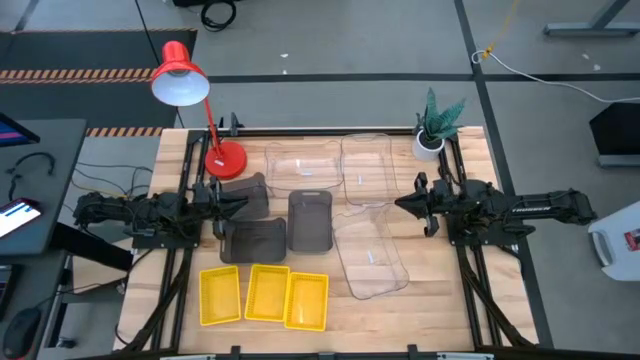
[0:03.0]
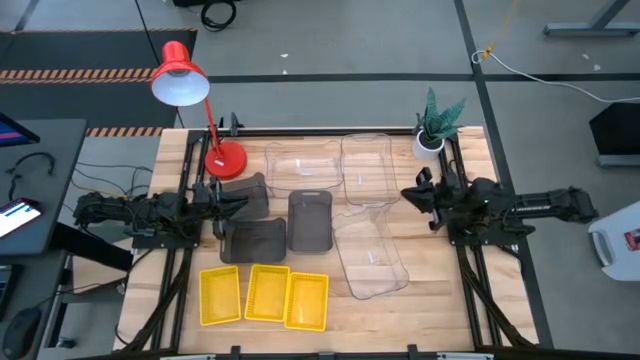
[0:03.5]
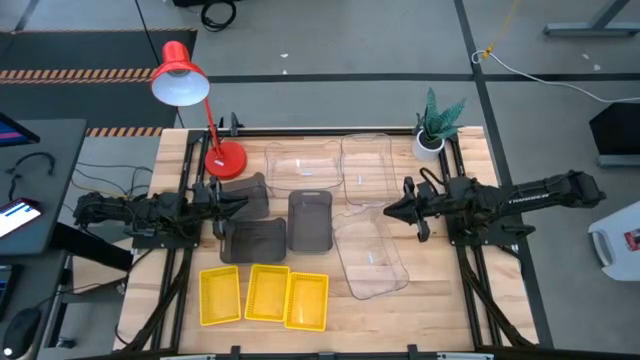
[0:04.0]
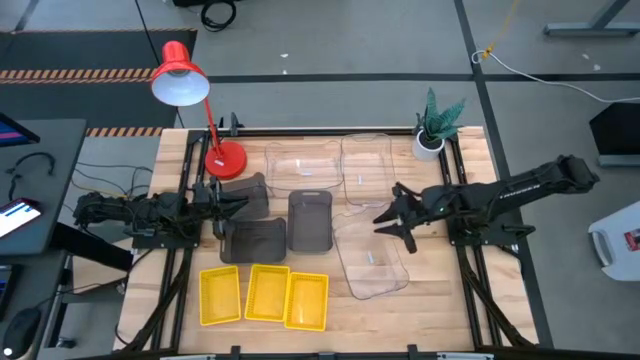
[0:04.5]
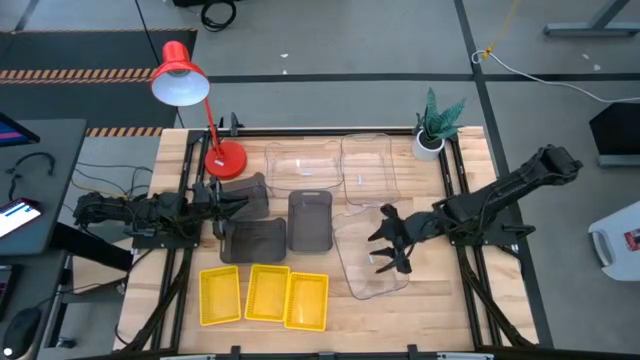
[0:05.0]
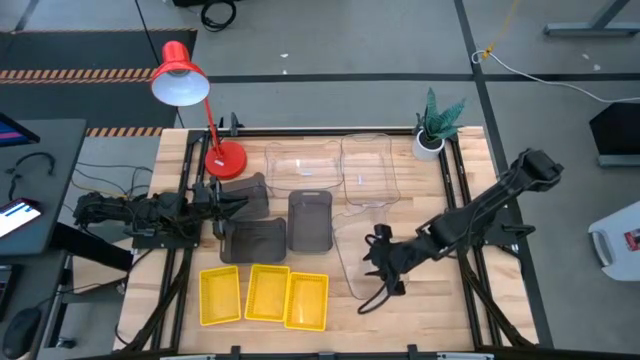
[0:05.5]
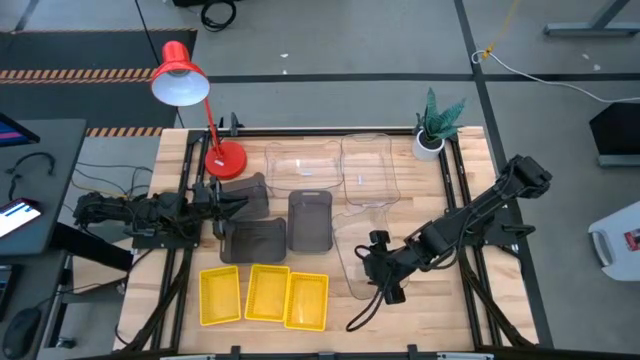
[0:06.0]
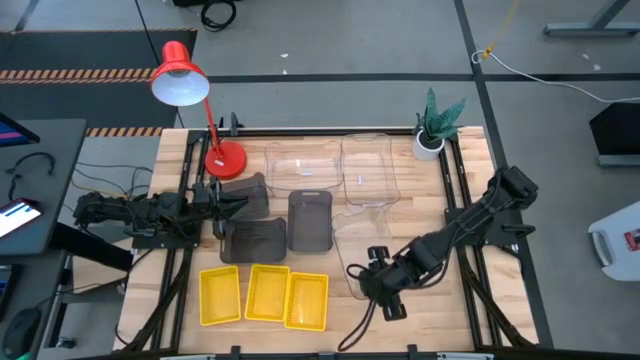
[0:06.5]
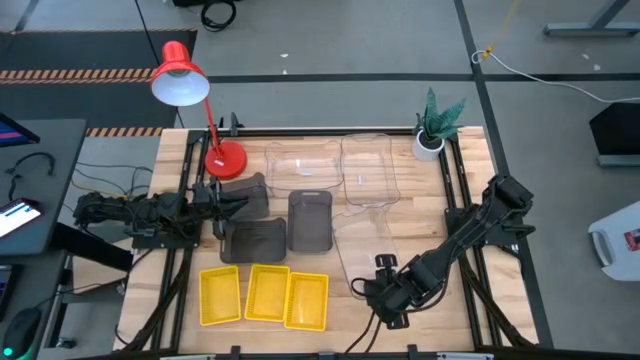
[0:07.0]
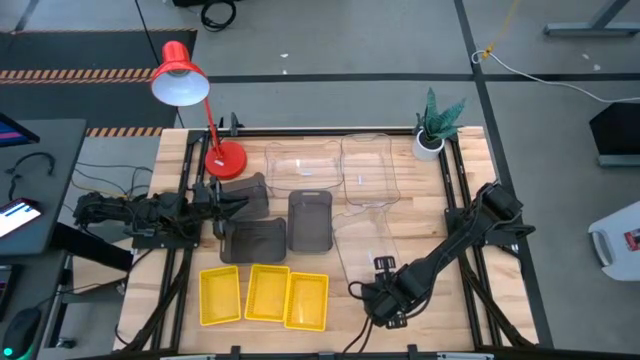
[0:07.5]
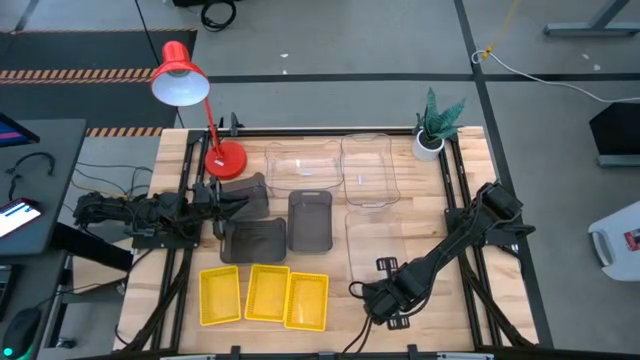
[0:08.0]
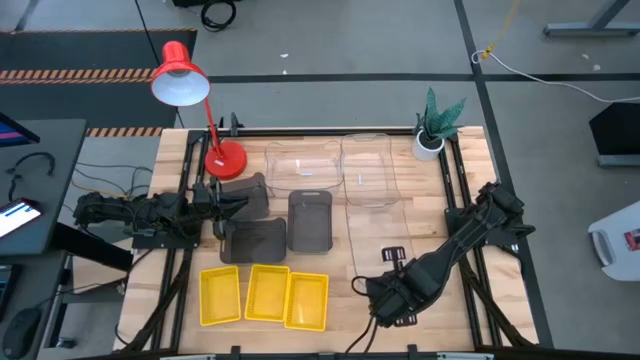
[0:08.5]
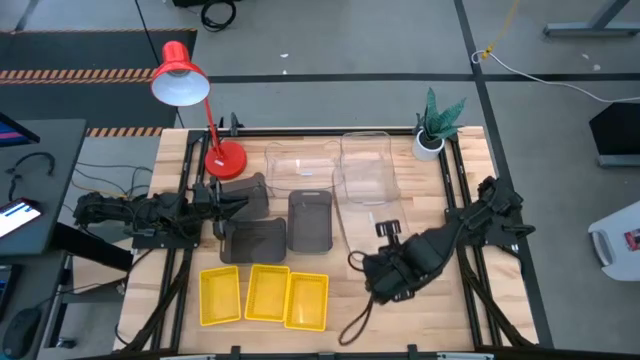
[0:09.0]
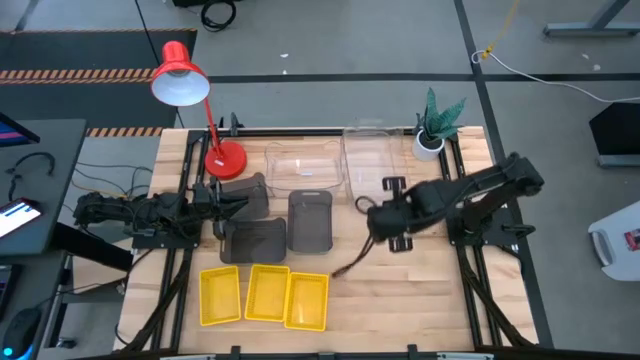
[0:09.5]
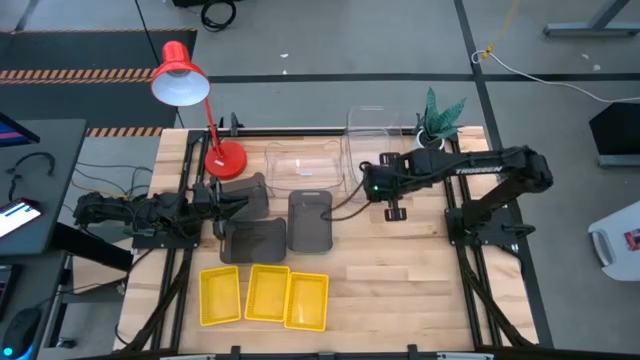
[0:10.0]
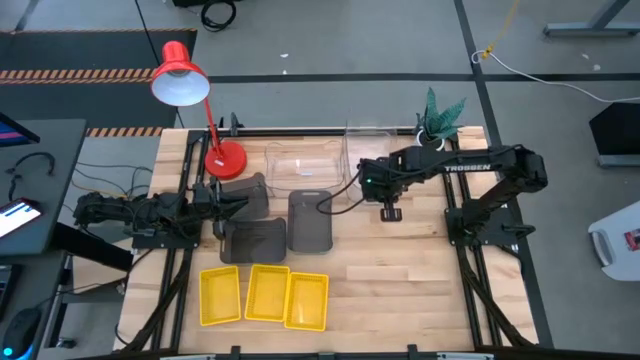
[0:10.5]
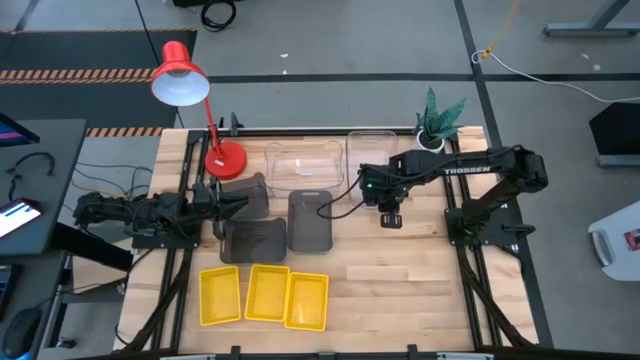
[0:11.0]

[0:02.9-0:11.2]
Stack the bottom transparent bin on the right transparent bin

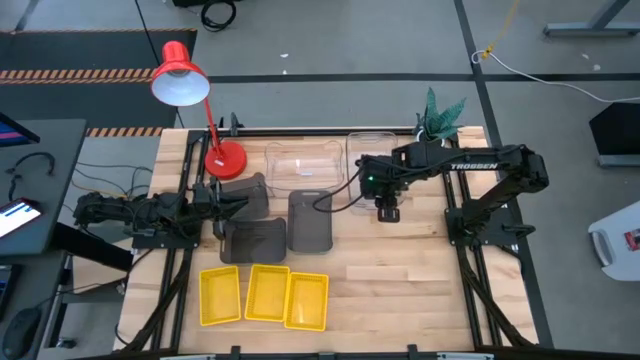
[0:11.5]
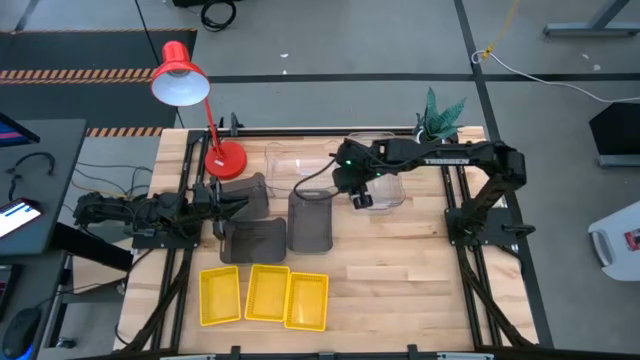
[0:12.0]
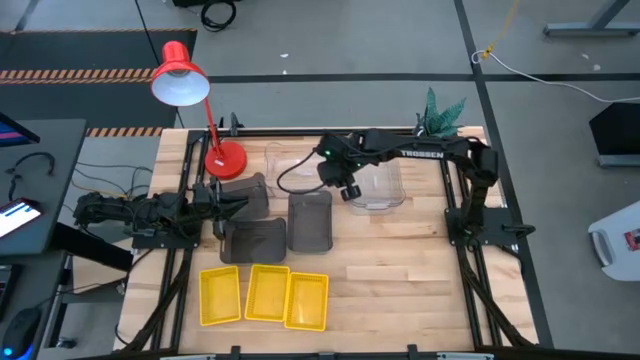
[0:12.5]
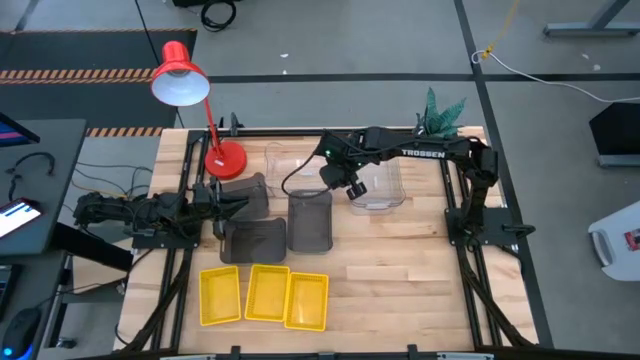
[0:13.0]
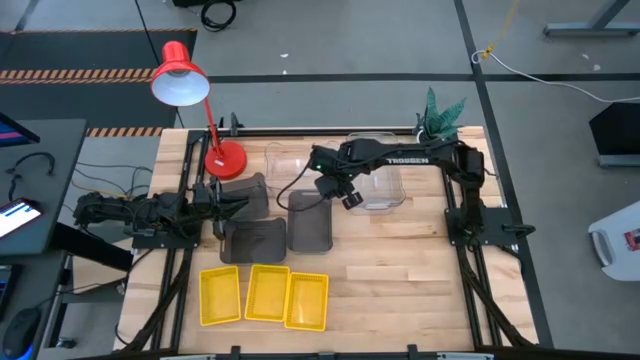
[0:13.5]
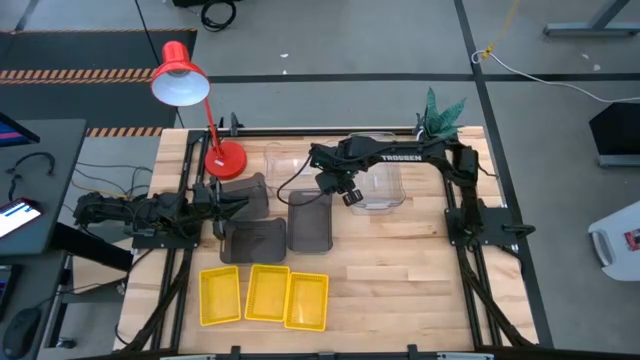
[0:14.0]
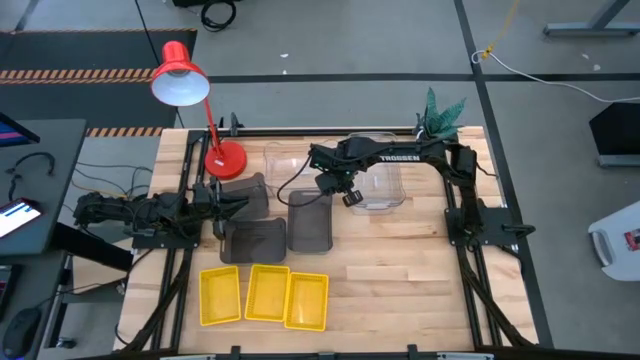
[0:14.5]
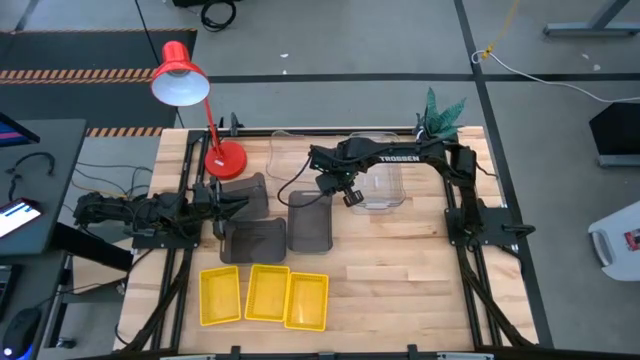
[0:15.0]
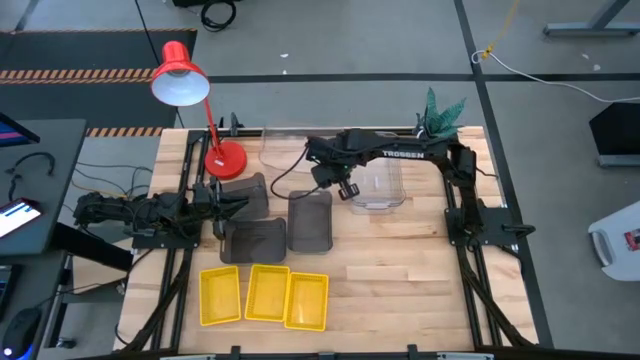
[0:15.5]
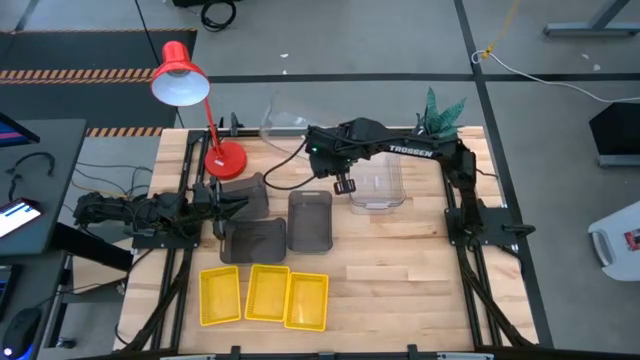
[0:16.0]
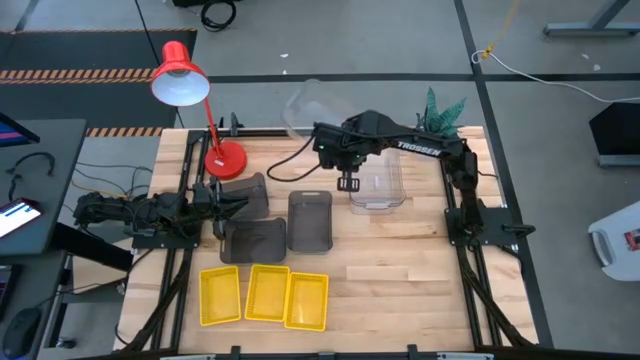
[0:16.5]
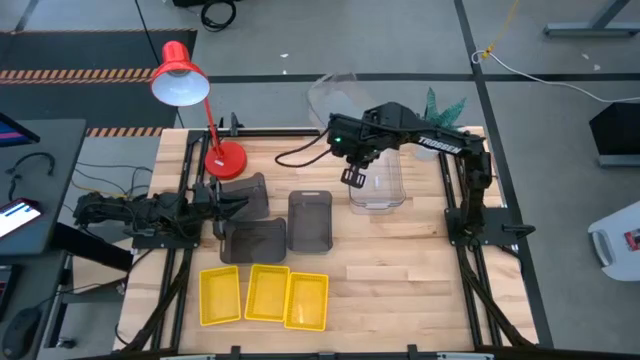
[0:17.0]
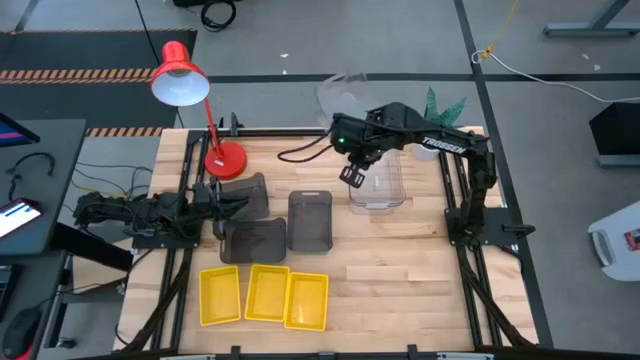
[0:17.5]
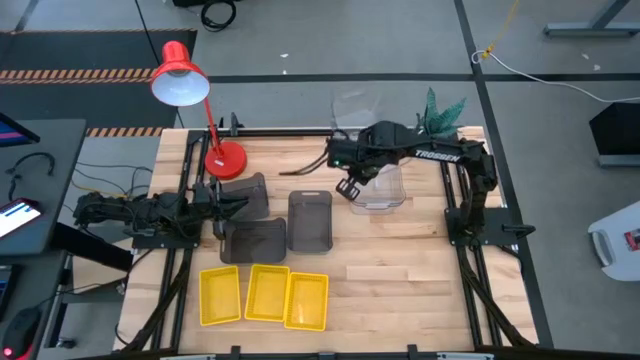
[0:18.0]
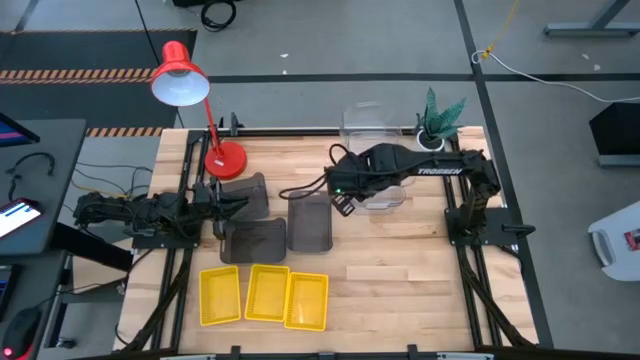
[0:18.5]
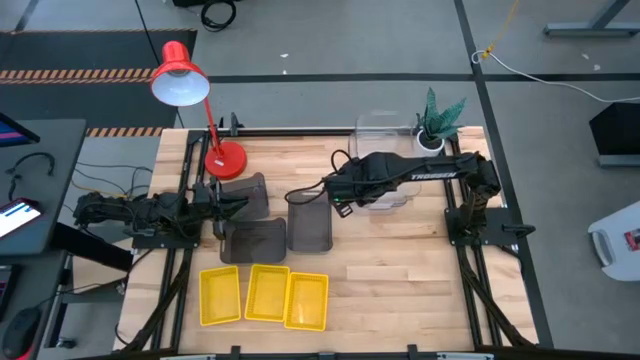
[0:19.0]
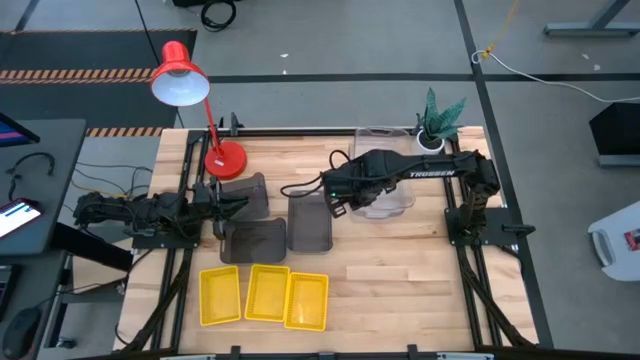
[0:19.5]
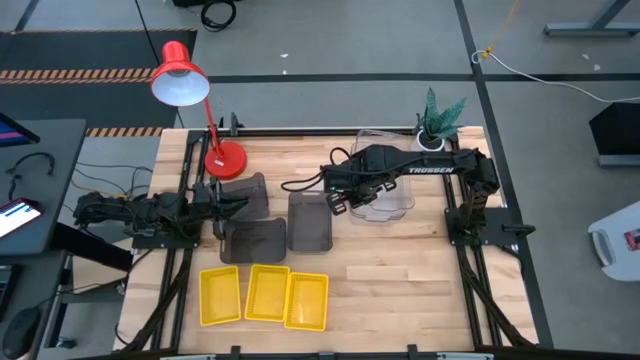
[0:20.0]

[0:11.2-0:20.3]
Stack the left transparent bin on the right transparent bin
